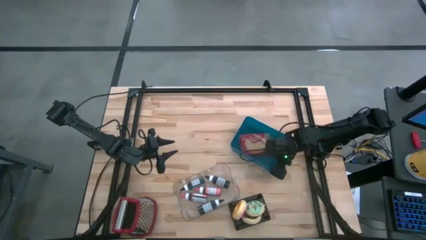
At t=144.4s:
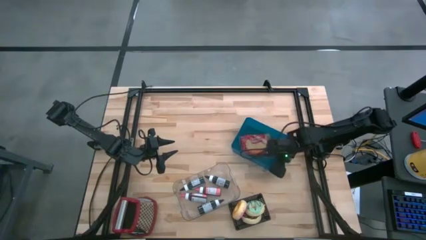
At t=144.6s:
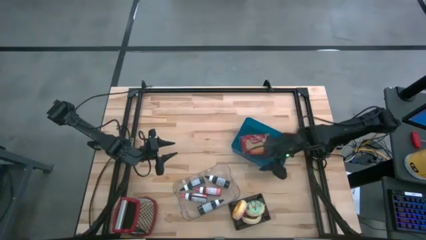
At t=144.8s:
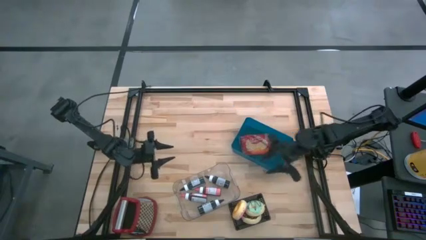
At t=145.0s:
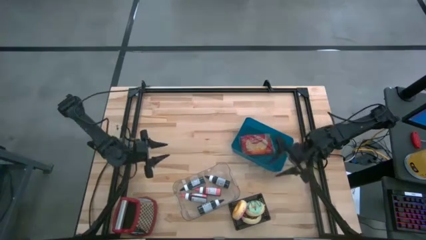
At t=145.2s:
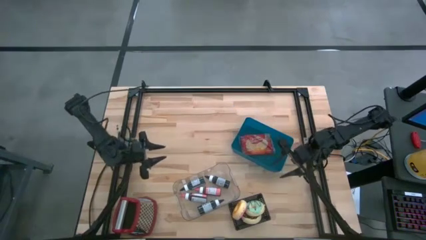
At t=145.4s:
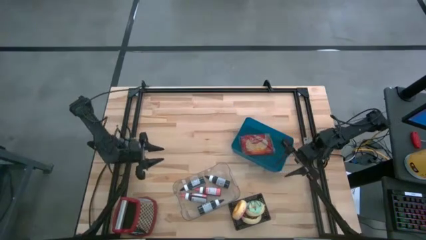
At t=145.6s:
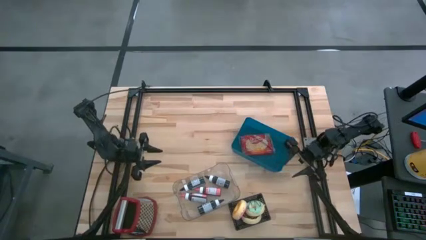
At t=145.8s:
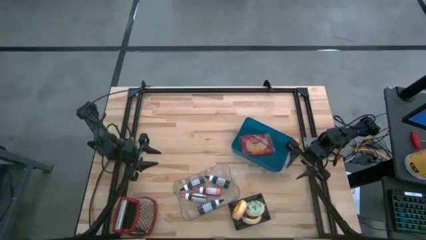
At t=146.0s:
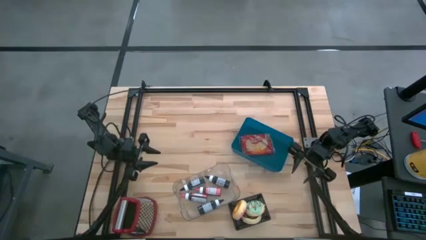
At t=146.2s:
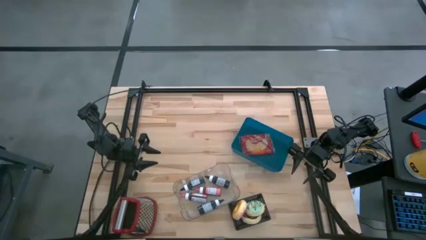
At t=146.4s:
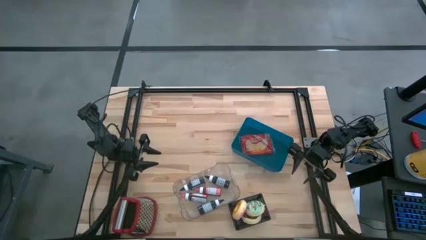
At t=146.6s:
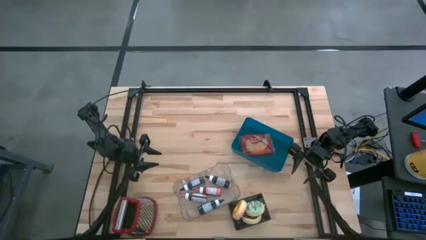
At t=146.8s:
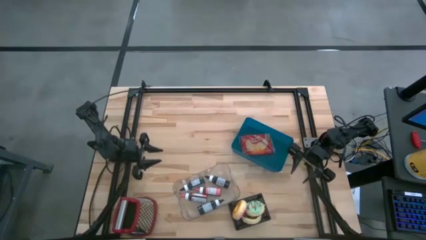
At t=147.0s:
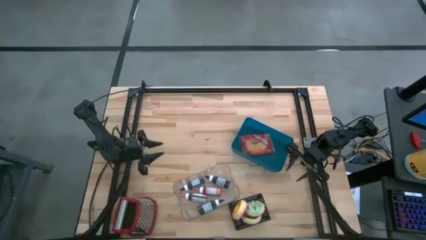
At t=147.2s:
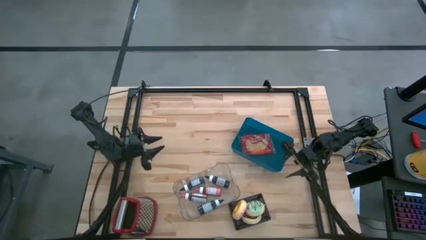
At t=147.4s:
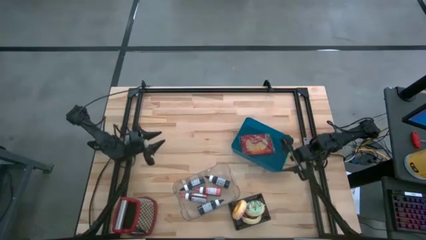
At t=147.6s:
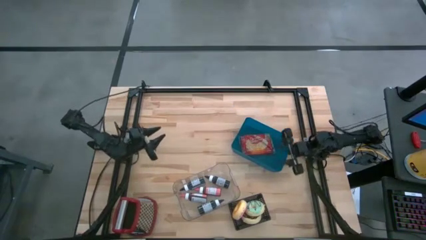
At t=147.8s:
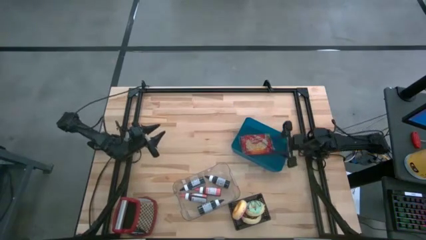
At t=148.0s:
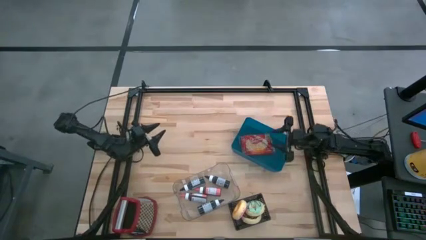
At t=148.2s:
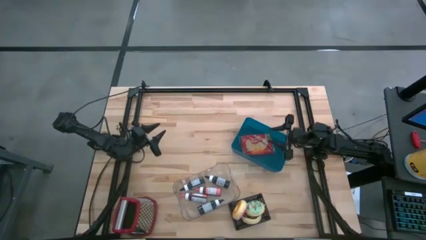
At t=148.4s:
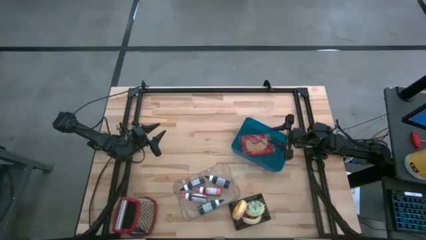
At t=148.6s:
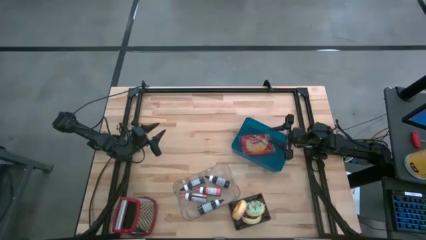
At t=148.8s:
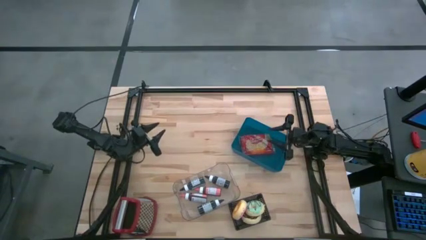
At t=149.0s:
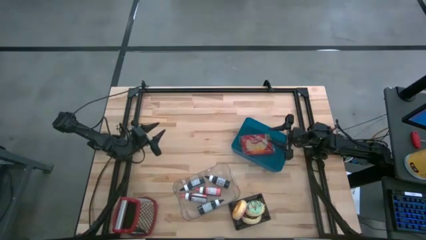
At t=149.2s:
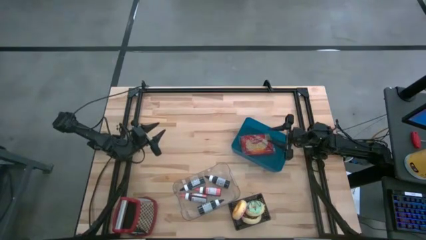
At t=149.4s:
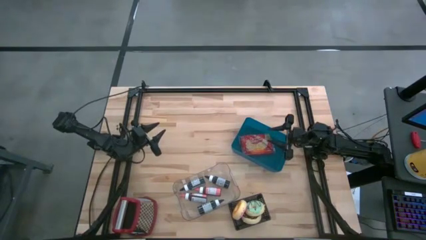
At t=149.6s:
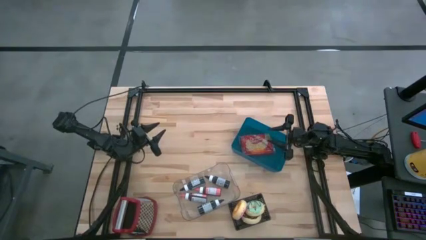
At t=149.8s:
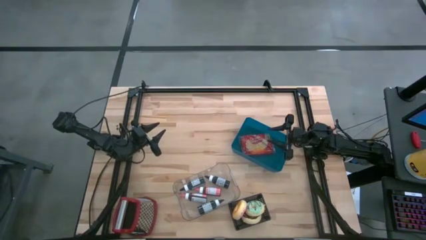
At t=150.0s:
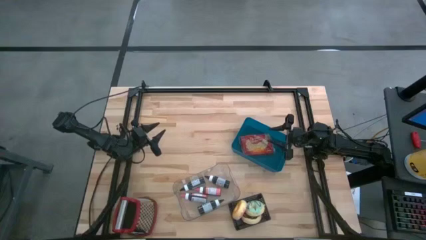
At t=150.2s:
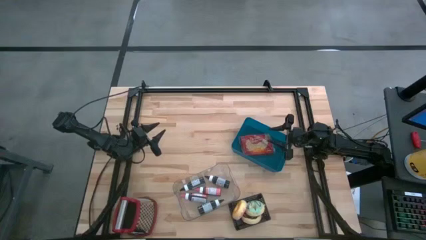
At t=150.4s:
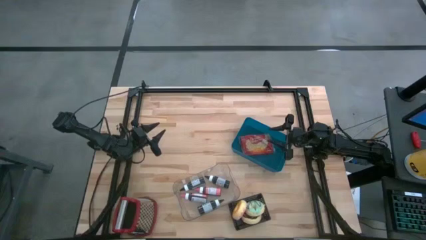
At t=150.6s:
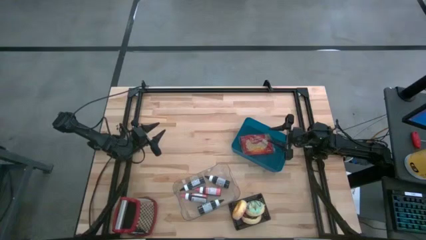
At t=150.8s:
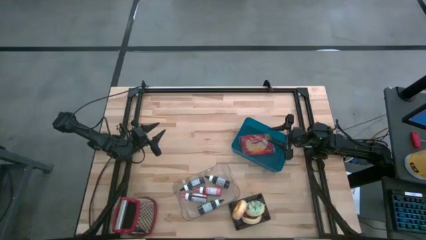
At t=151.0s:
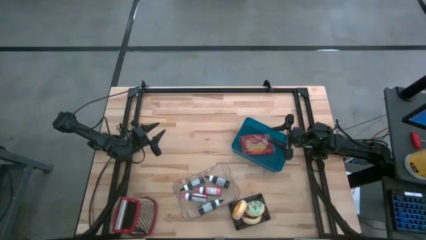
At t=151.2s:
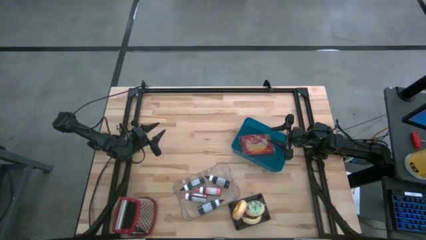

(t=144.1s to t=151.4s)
Return to Home Position

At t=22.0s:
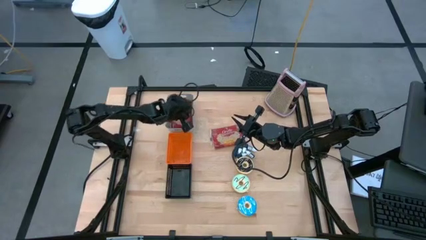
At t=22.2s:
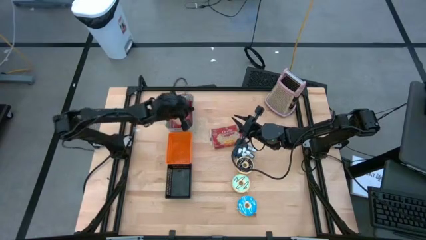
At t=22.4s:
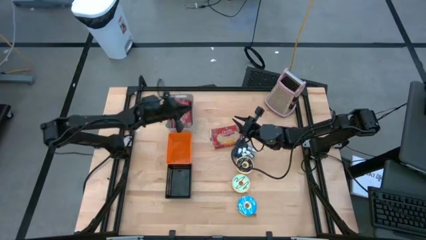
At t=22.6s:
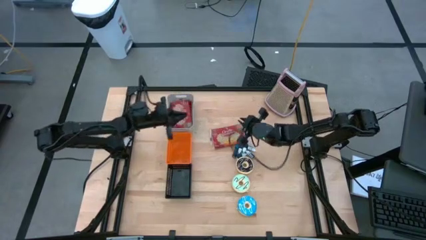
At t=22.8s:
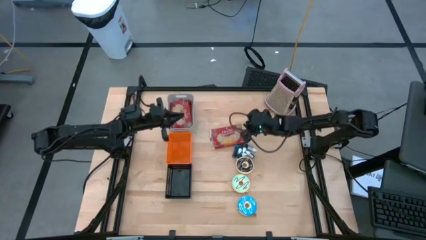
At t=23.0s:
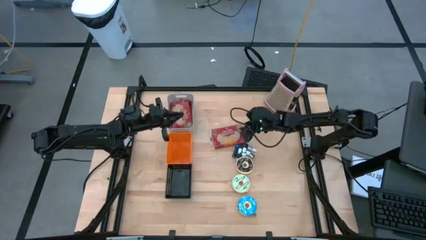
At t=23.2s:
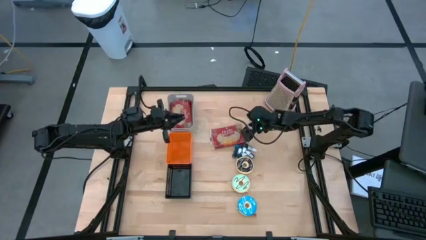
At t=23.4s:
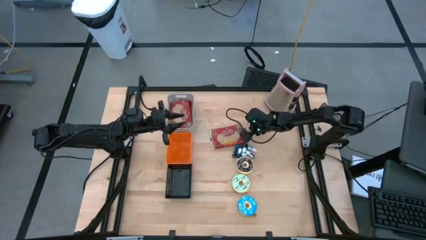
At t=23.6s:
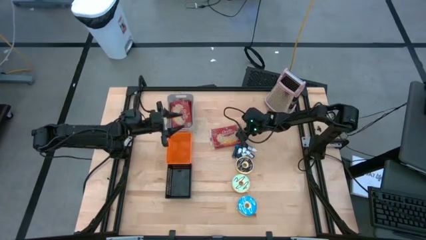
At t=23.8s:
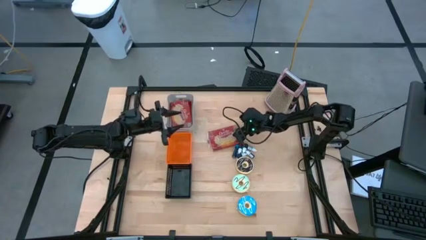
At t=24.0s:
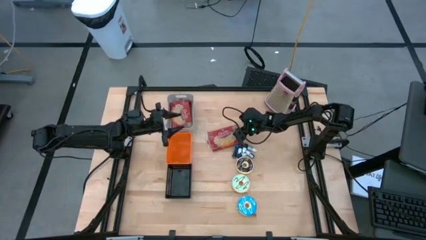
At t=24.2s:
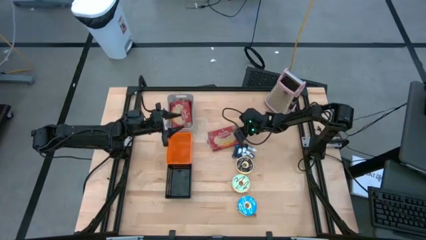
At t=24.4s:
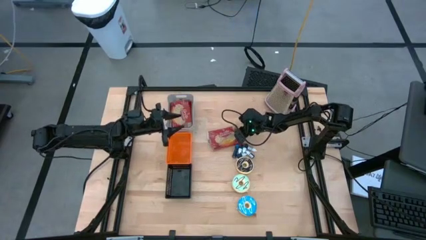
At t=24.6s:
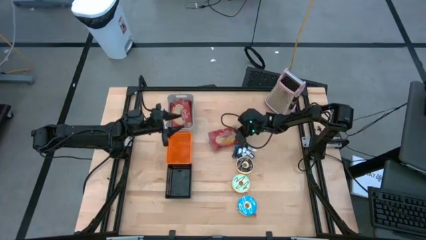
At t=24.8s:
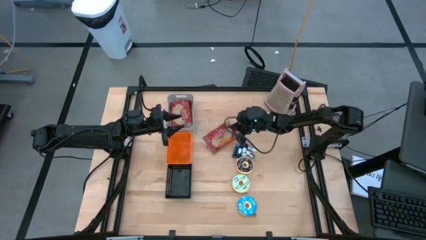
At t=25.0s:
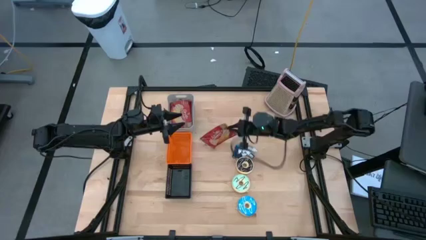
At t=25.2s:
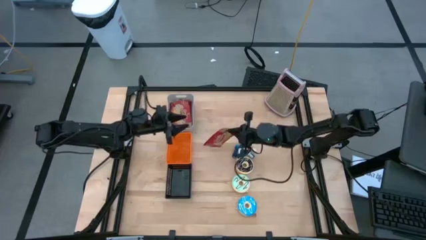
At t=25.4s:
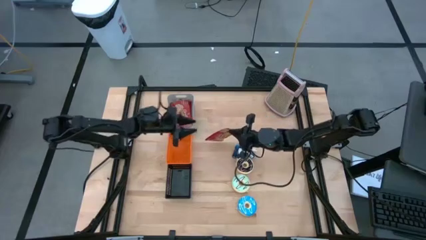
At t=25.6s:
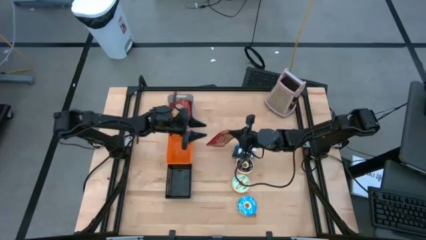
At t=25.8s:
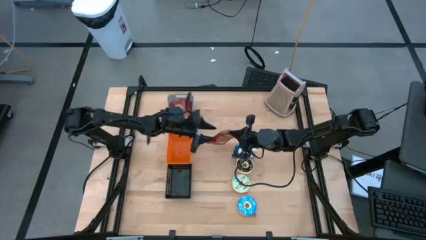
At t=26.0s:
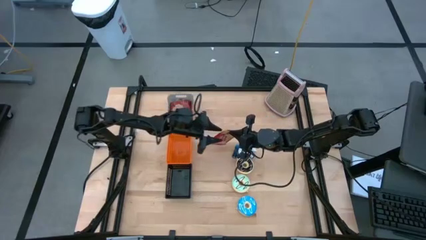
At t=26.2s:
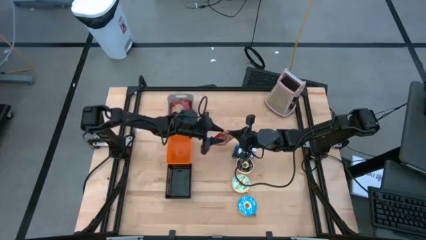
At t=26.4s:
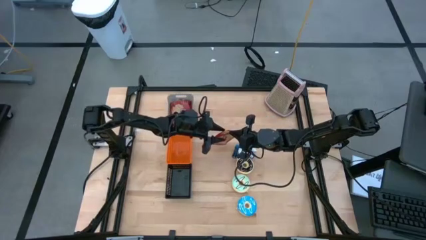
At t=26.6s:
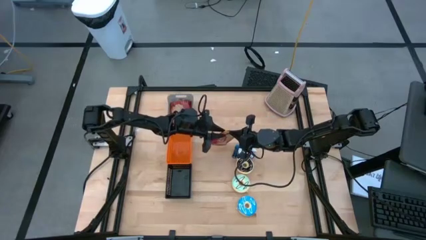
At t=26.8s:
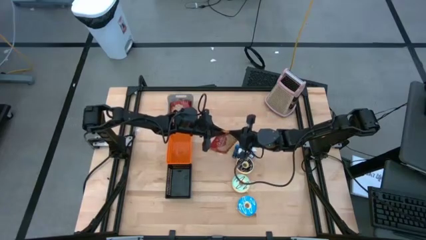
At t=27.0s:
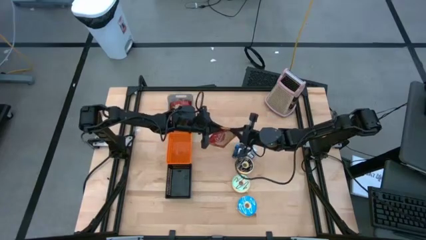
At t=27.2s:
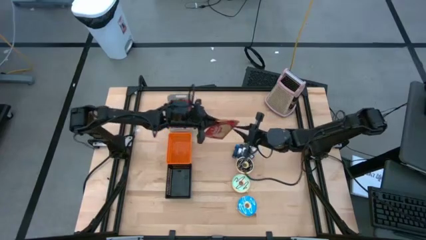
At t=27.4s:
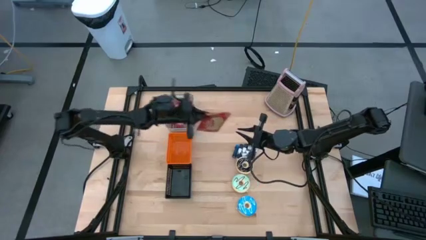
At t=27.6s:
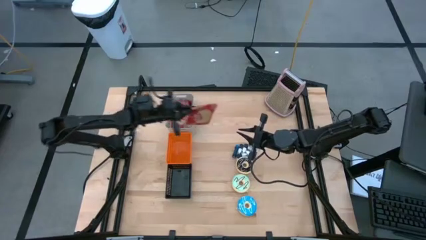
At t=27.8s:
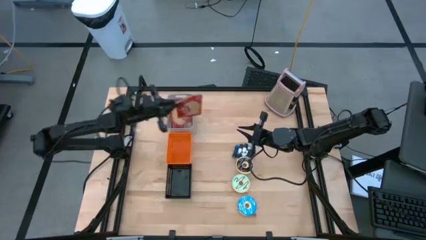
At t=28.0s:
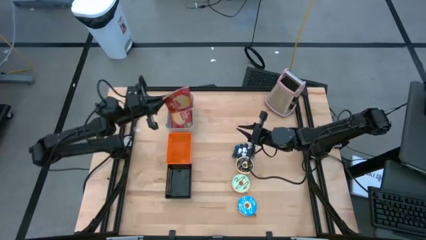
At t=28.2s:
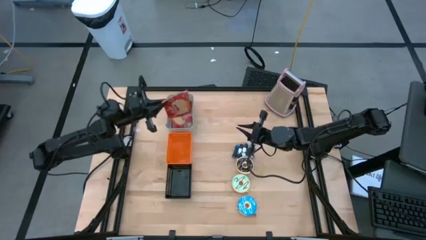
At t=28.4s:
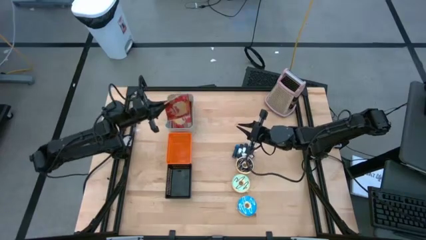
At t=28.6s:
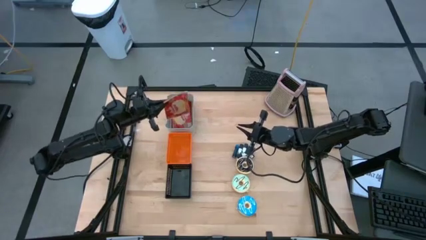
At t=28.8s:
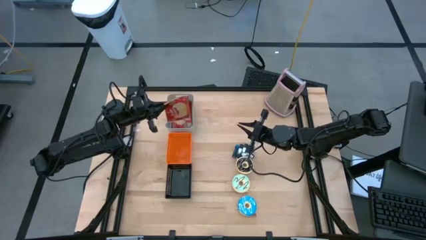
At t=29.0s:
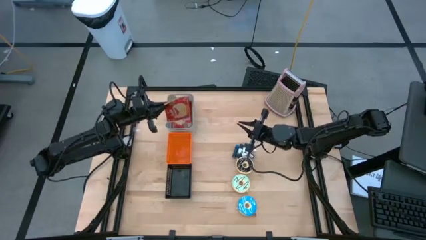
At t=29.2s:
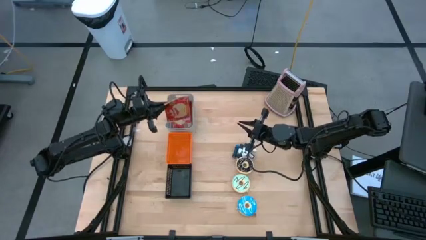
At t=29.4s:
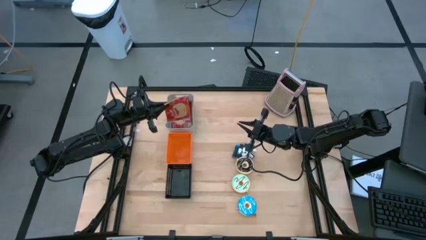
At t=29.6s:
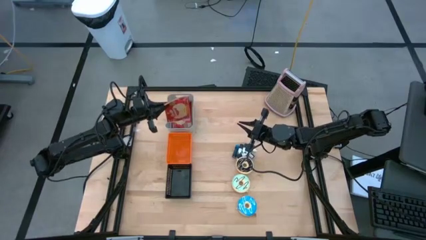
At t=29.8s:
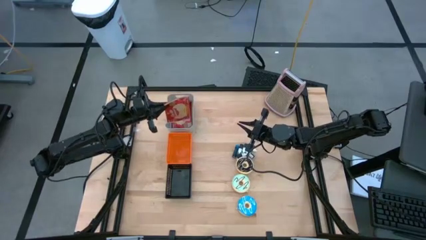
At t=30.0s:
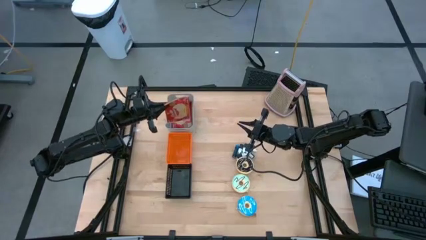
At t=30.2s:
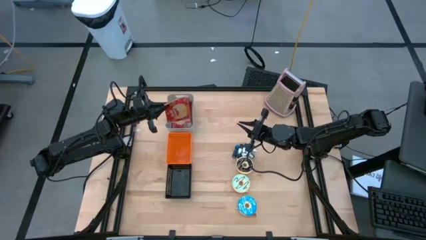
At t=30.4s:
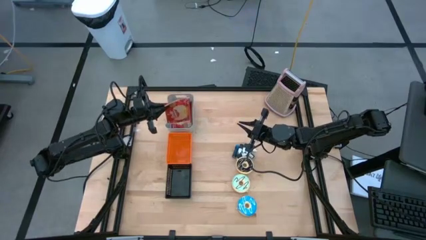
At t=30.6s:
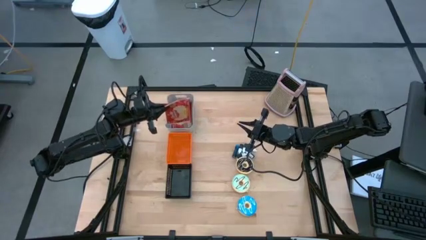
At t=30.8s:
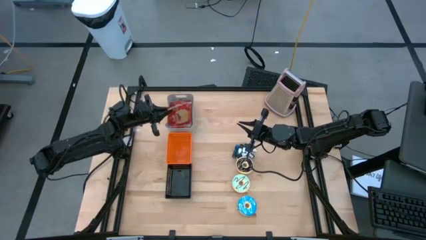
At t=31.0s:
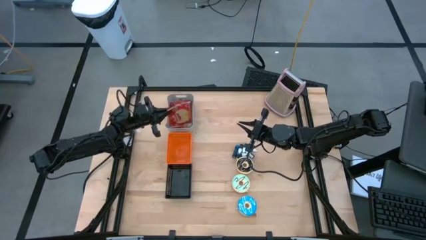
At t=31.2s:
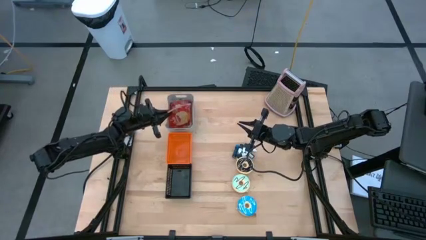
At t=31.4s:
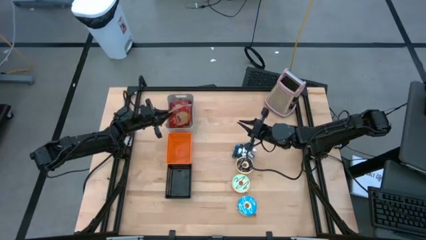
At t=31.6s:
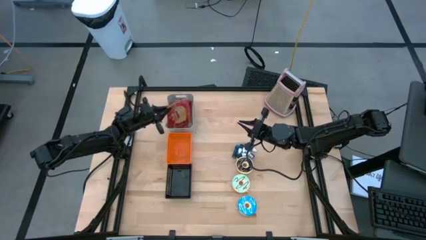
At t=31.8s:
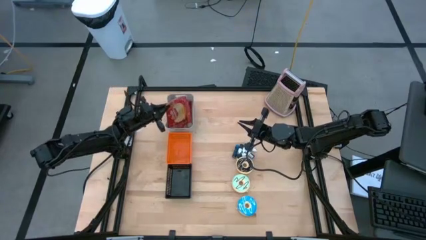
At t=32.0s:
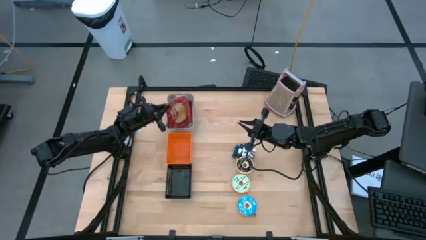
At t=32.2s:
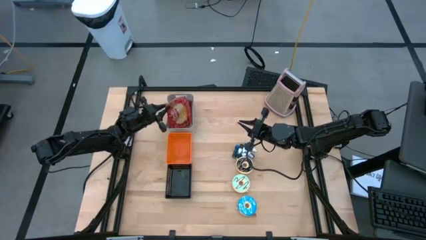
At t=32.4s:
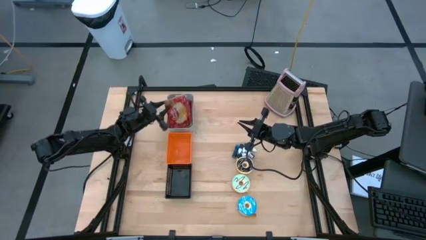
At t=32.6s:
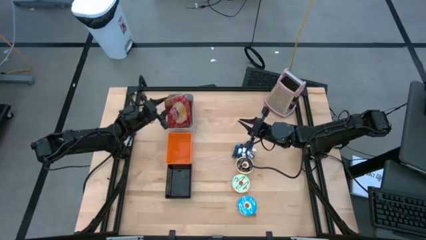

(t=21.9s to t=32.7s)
Put the red popcorn bag into the gray bin
